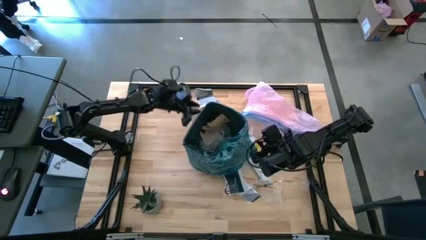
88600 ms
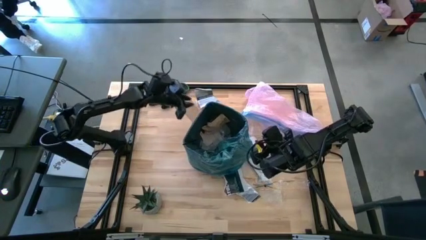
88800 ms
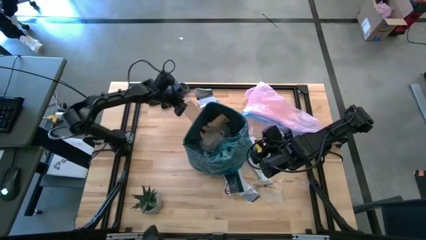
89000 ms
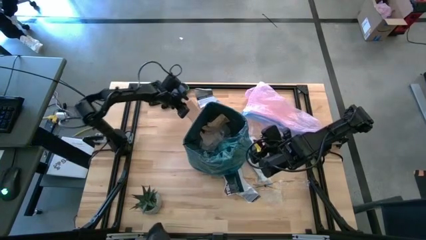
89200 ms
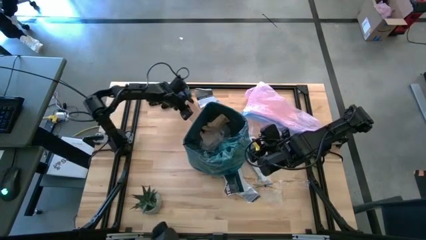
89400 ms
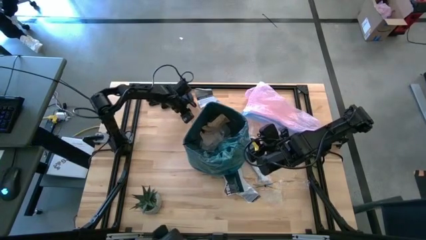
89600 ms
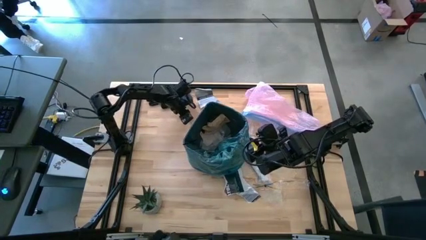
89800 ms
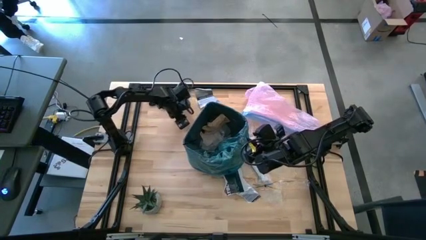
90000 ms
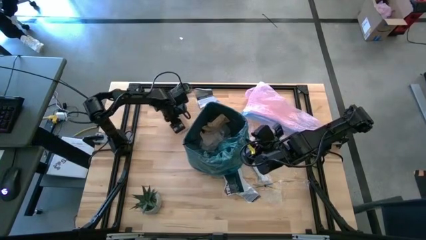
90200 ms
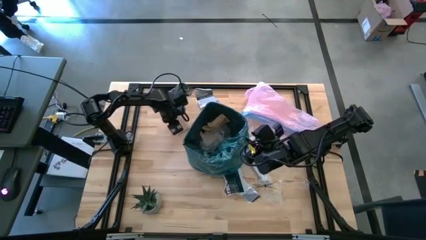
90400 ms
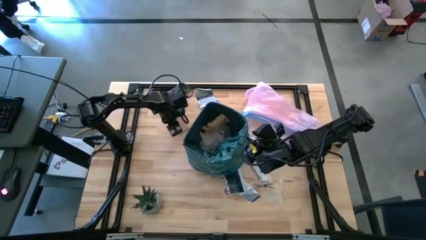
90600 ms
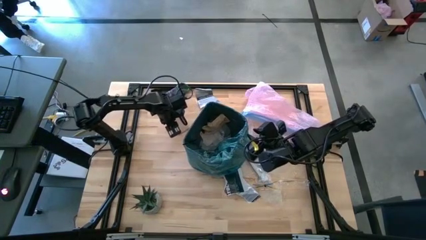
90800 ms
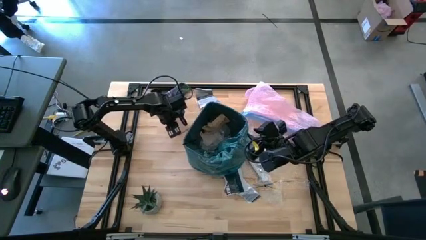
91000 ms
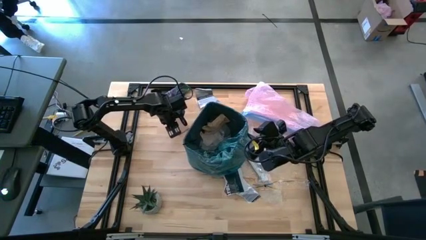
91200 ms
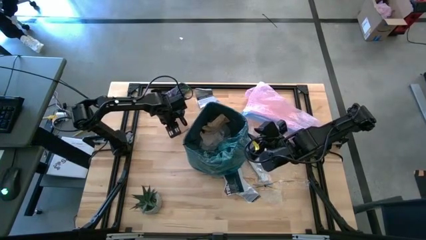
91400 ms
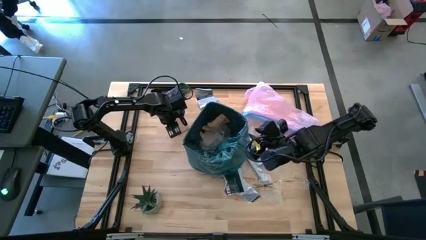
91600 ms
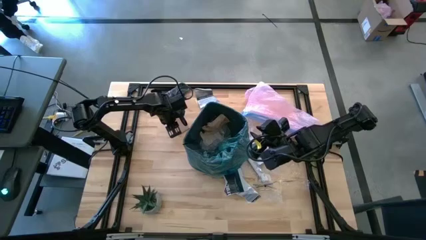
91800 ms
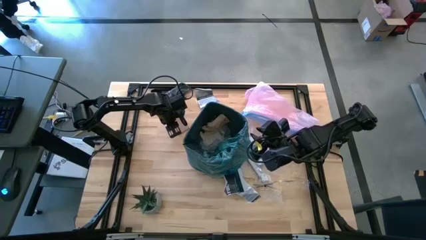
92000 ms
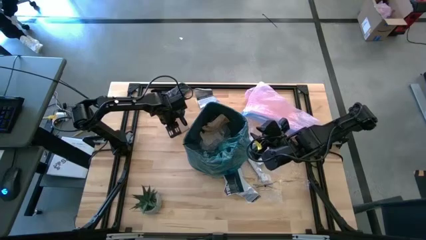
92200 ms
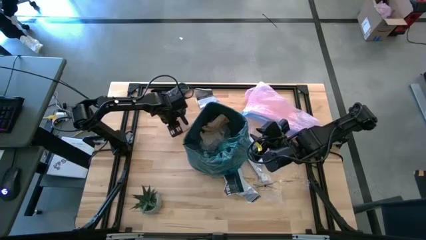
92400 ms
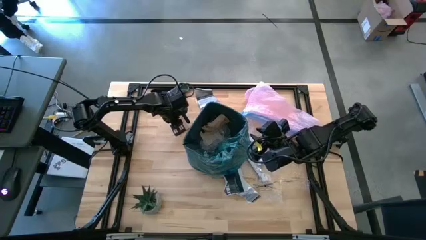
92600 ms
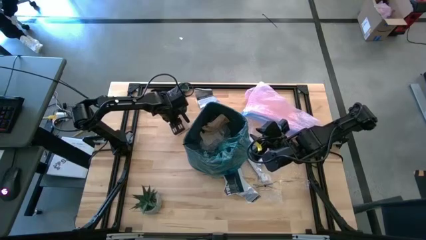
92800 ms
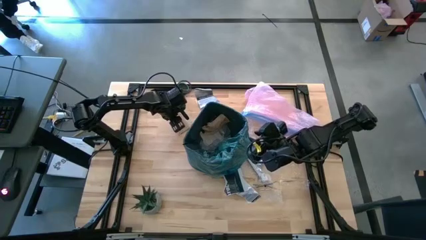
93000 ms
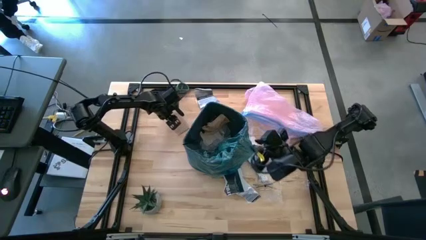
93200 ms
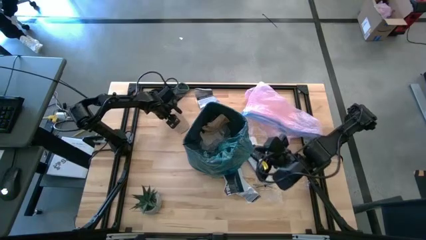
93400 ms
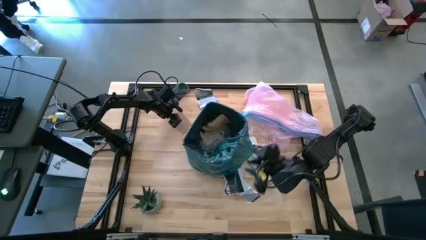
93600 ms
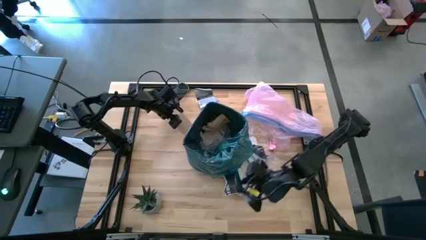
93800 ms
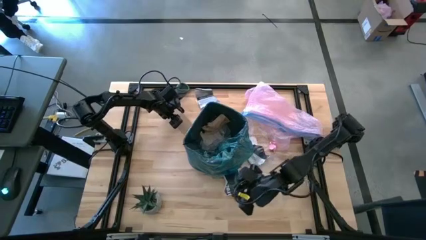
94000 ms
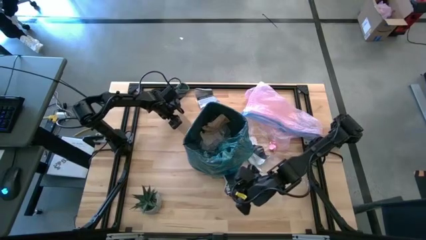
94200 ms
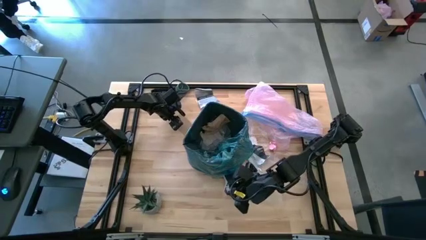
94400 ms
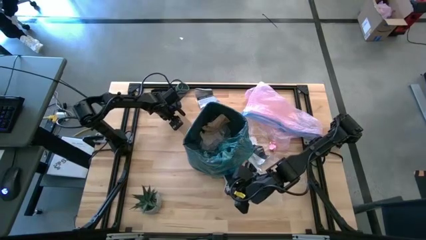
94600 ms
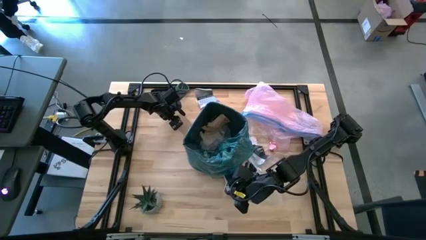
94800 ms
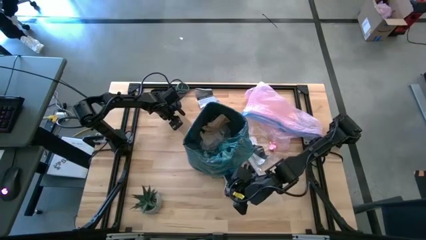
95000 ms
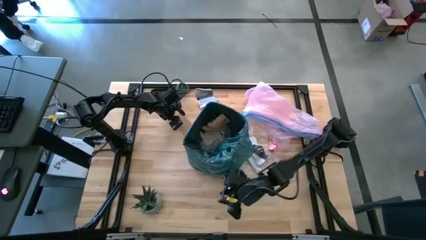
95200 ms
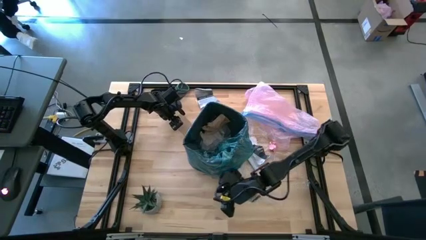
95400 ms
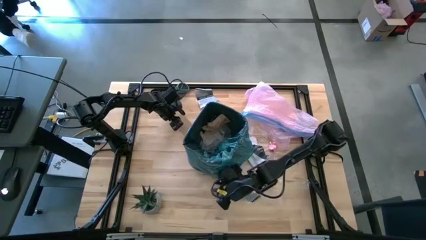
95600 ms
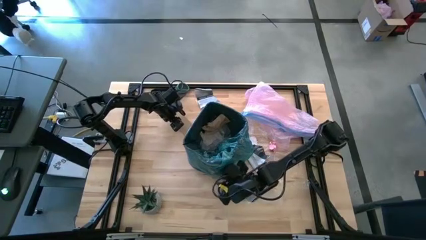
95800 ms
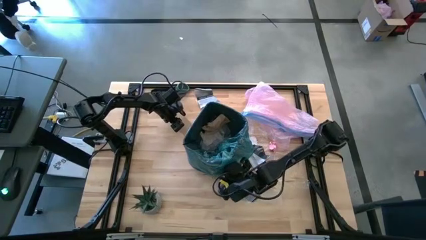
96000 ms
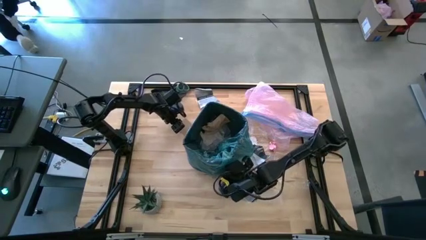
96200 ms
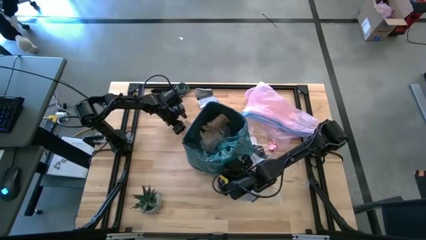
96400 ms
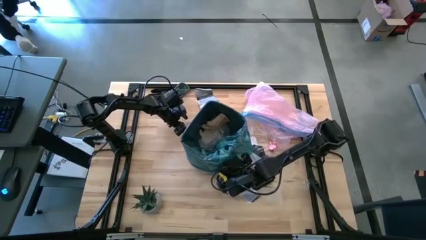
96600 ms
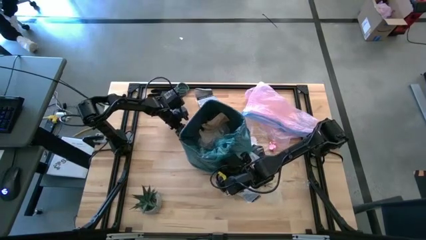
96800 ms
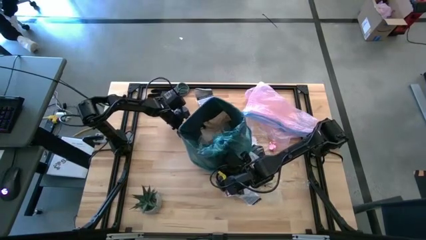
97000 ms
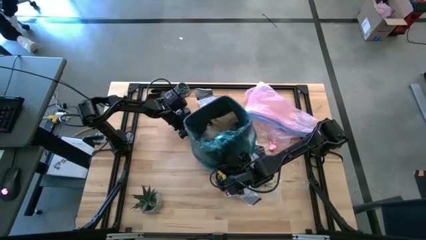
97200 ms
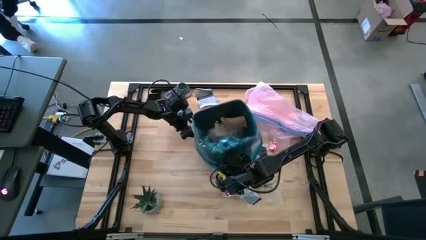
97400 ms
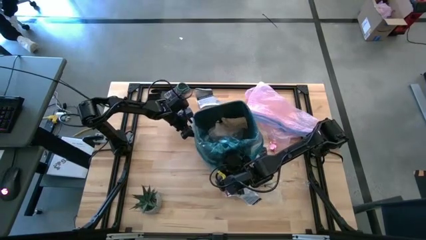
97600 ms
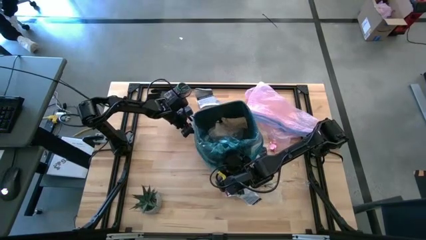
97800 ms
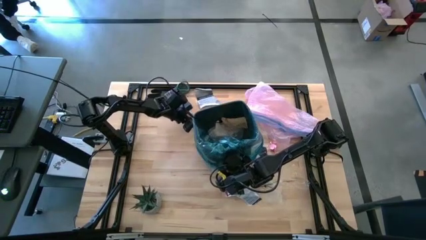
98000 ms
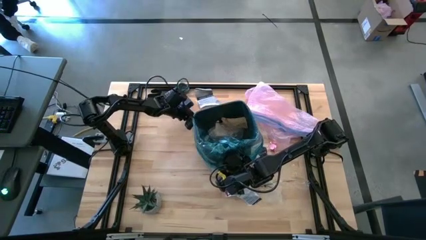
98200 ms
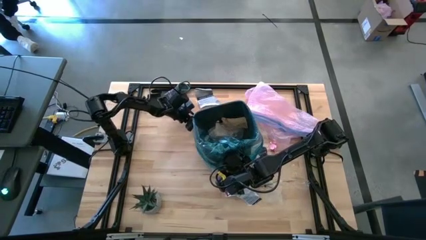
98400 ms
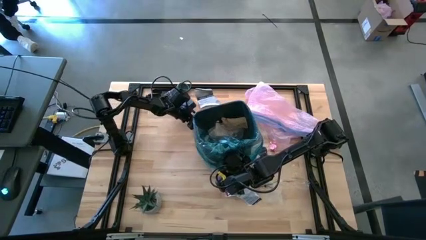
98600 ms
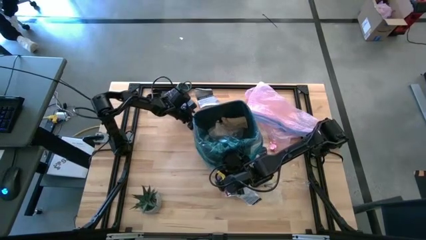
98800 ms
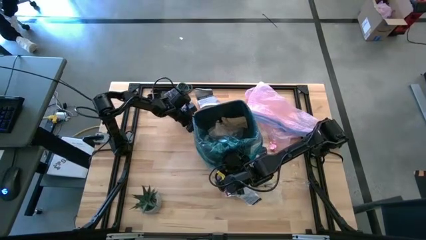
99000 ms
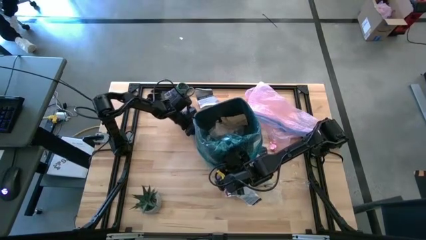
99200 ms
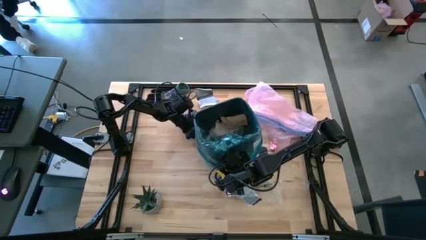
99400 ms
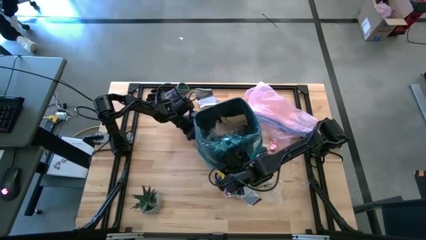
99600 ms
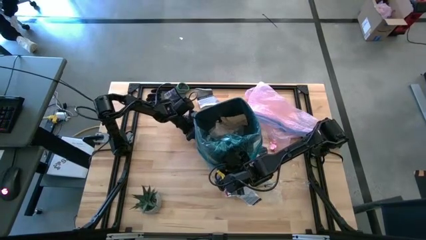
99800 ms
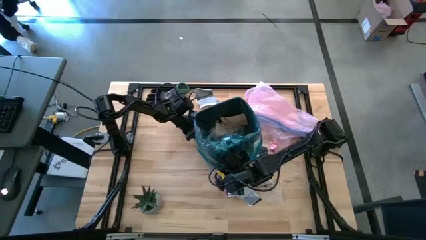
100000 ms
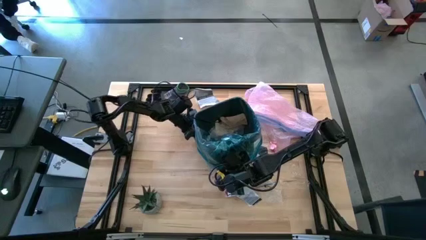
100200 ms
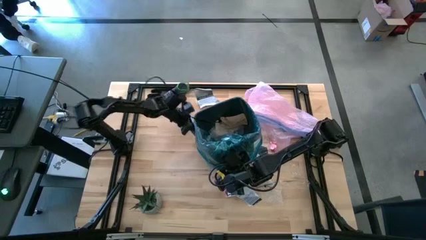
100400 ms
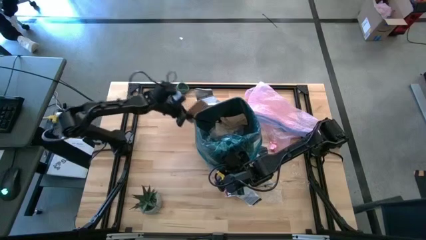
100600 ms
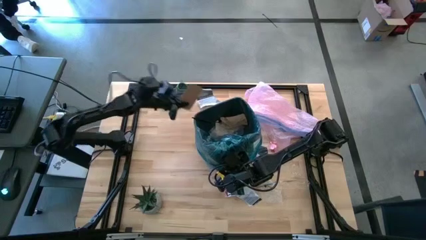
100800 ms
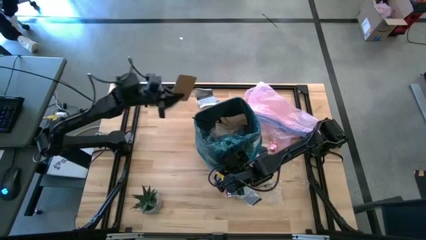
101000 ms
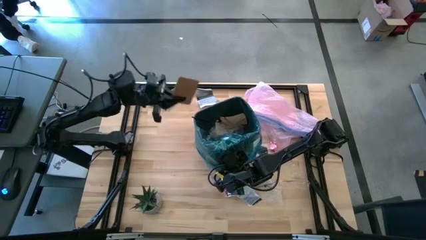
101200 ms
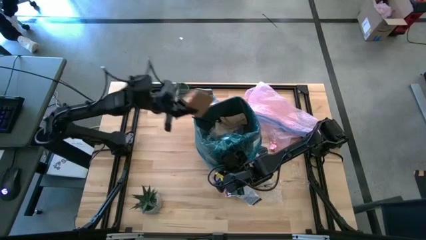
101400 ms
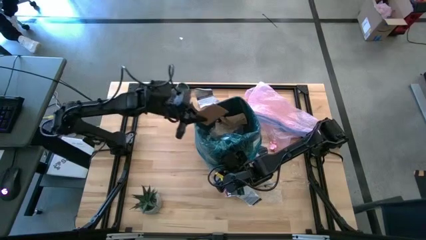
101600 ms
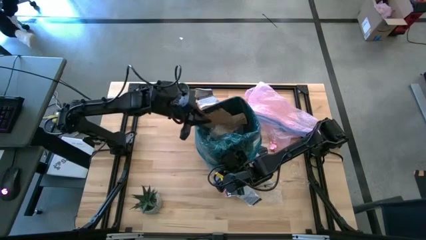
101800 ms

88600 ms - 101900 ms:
Task: place trash/remove bag and relplace
Put the brown cardboard into the trash bin
